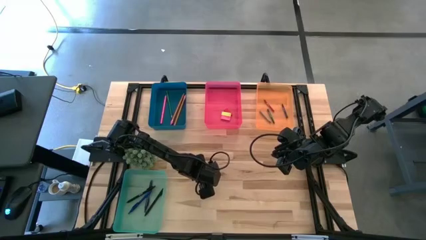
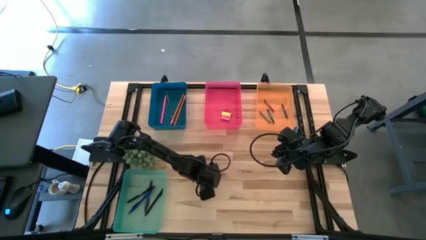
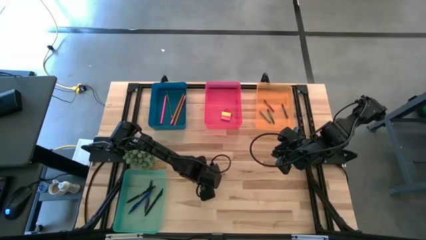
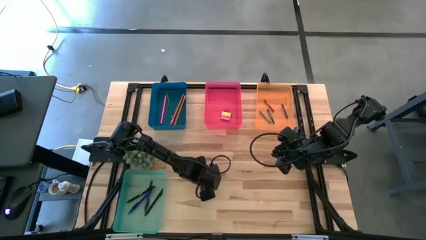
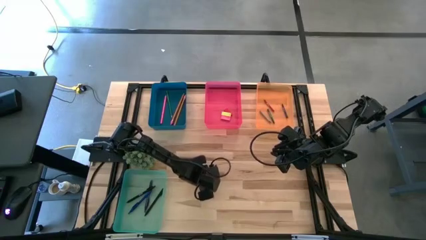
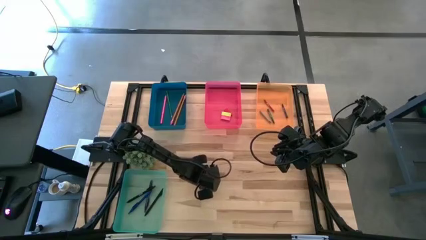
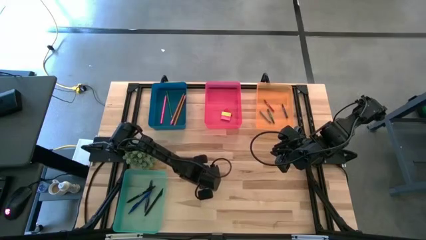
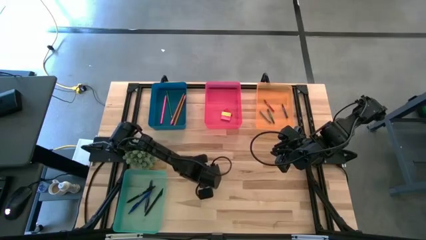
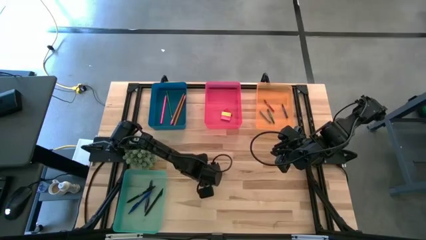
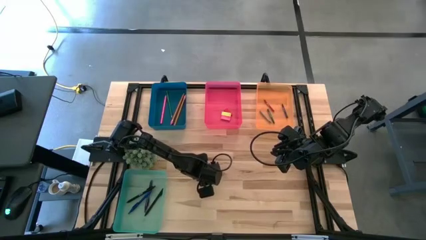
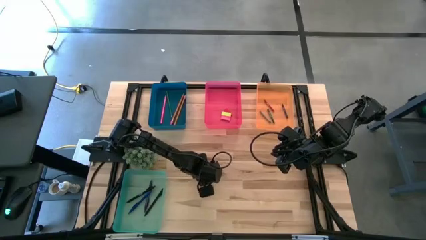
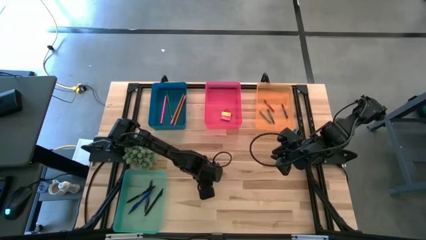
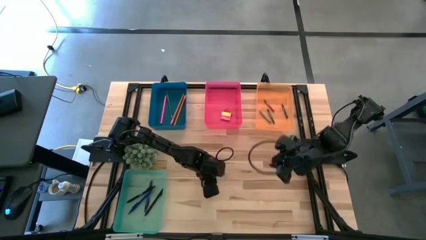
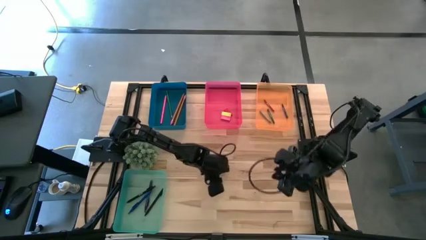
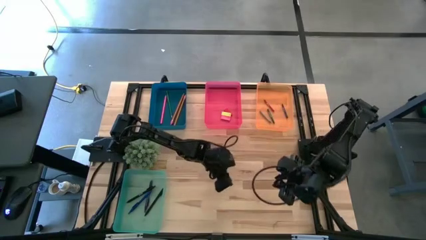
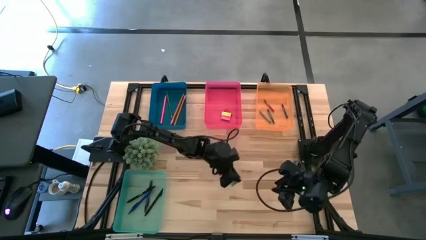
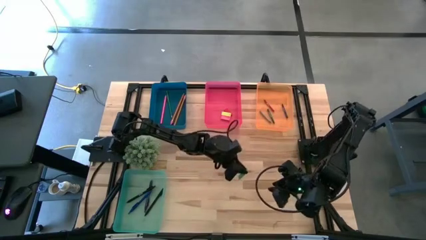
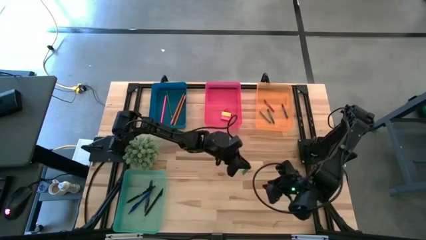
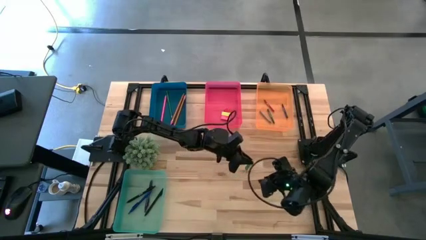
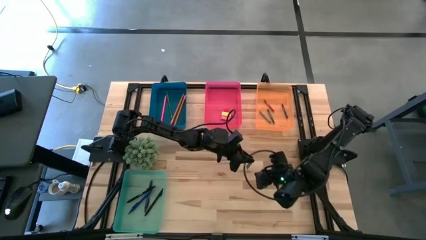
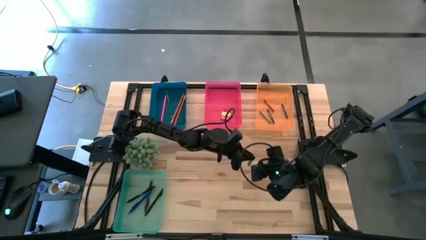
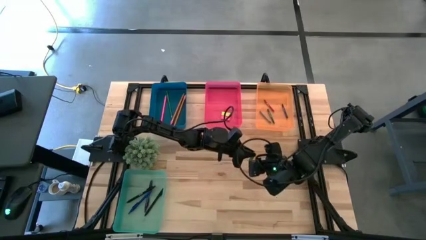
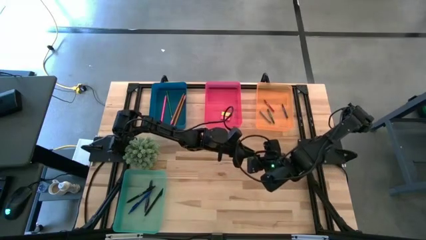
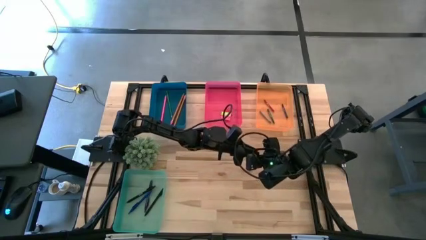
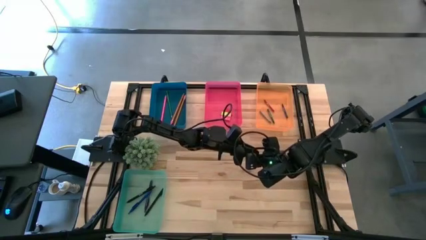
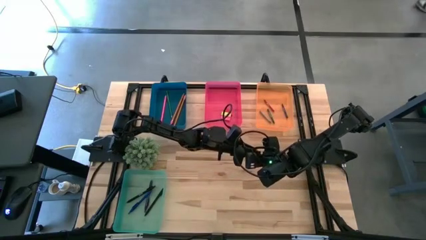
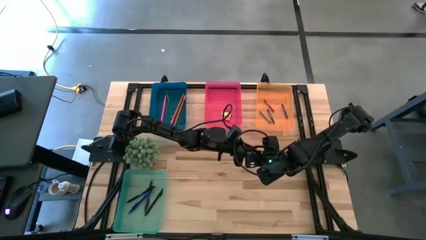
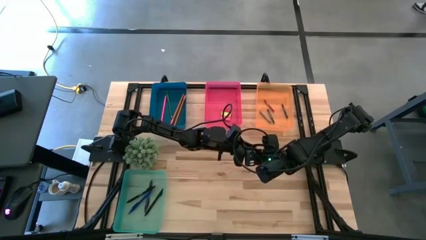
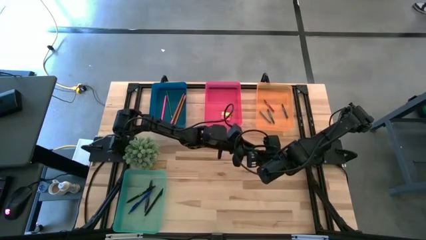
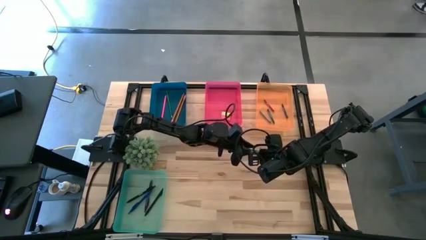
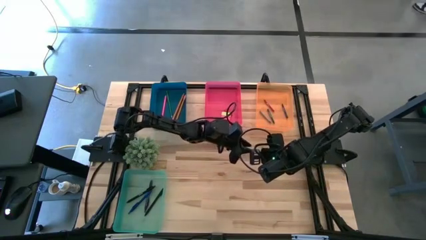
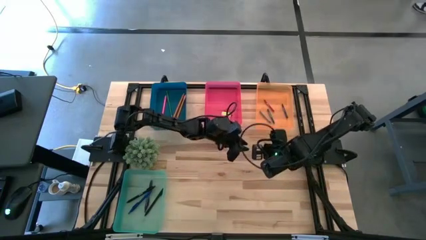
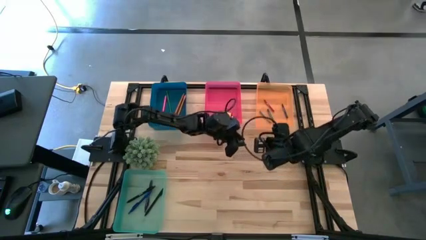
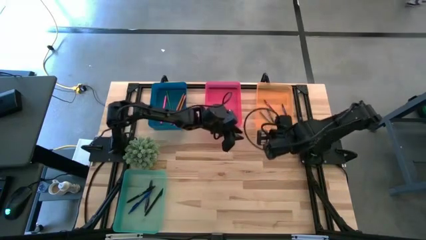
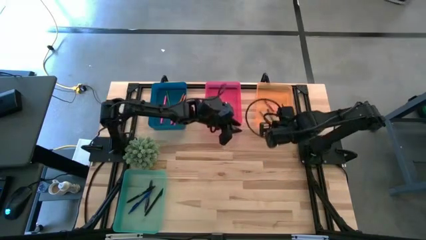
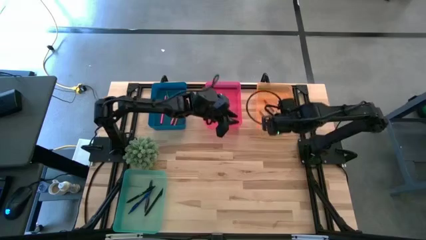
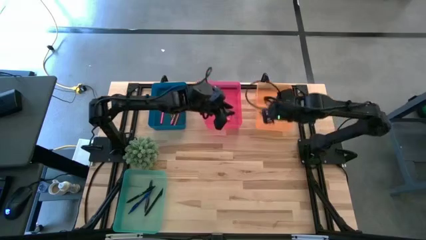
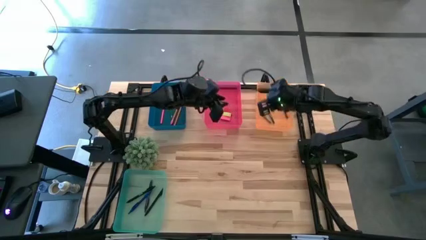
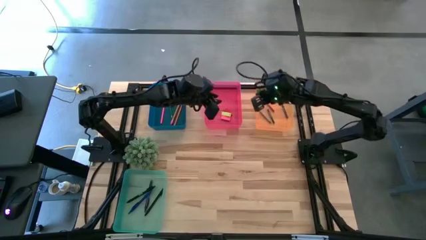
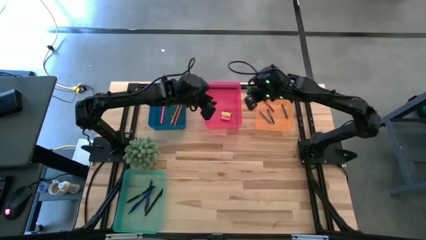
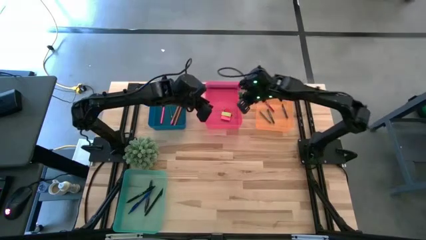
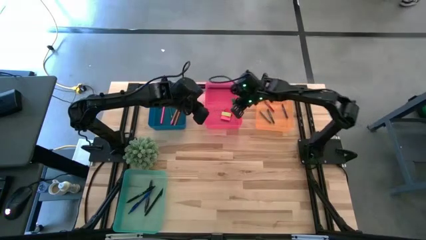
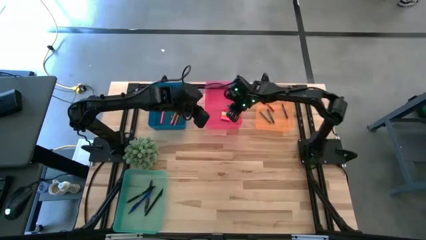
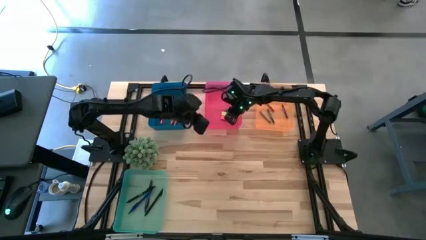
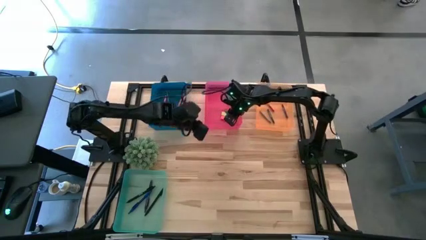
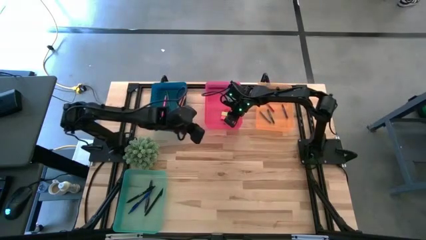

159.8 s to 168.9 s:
Task: Sort crayons/erasers/pens/pencils in bins
Put the green eraser into the pink bin

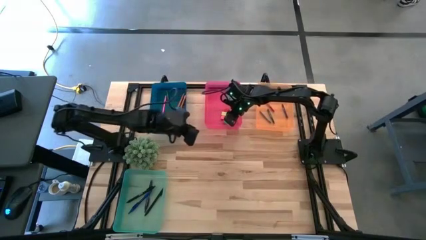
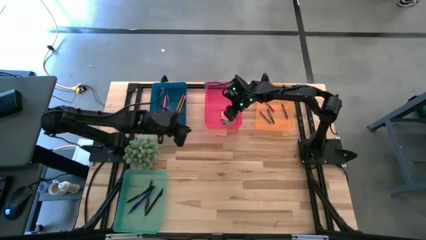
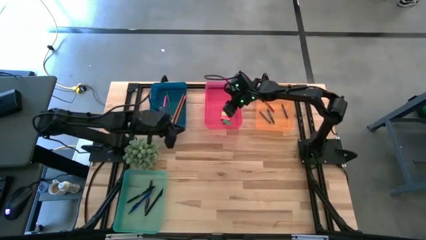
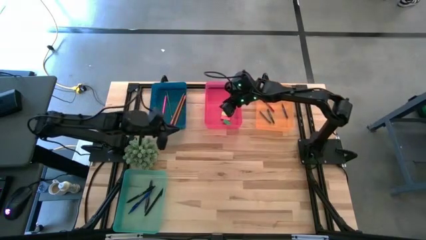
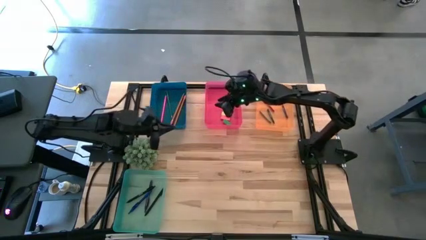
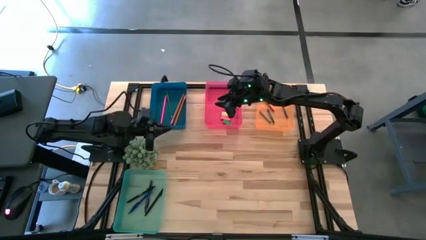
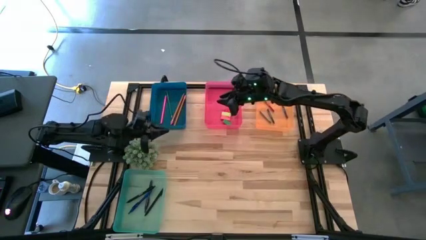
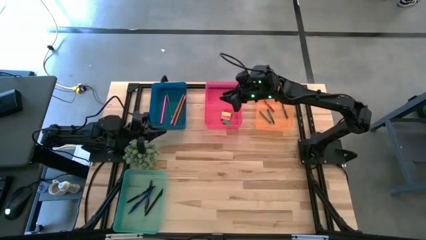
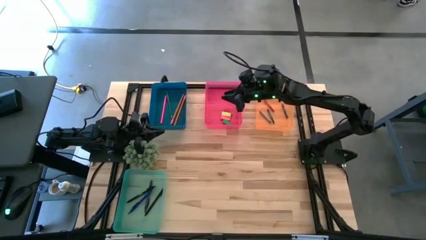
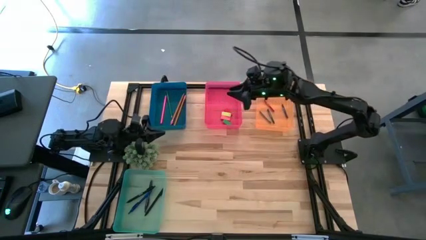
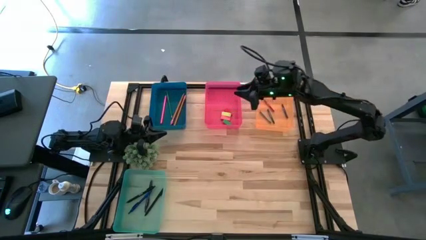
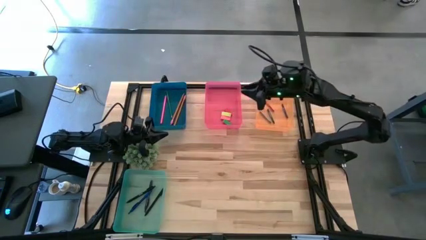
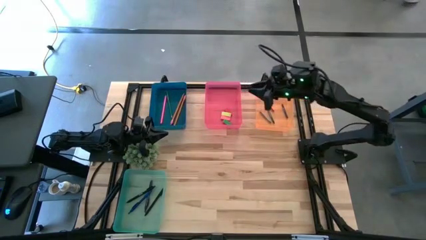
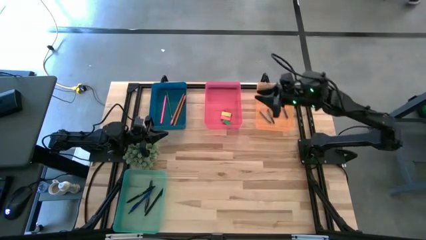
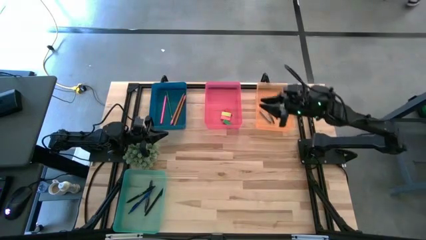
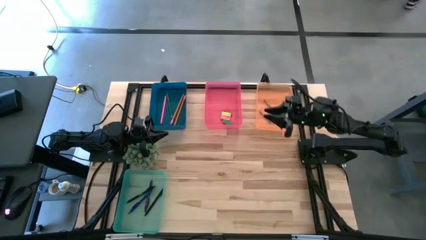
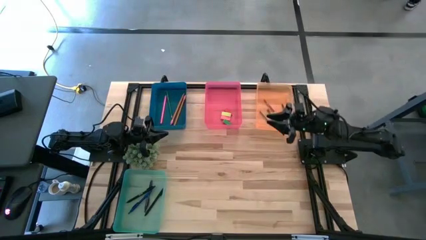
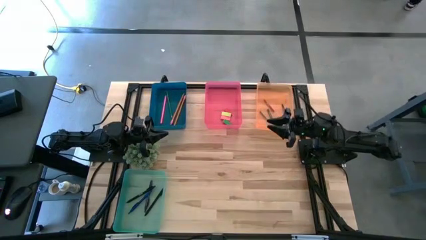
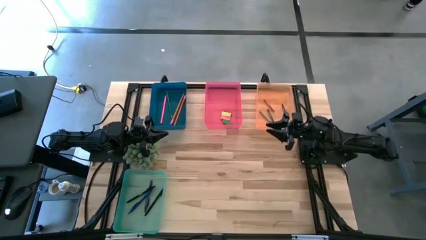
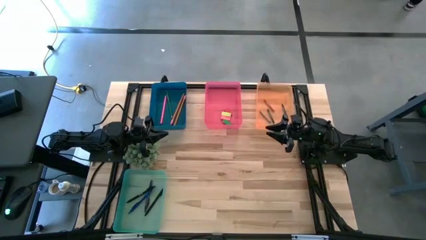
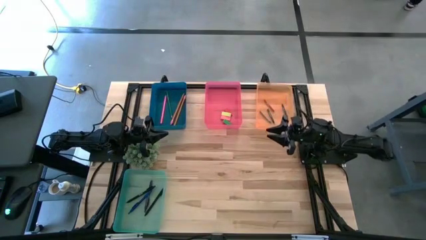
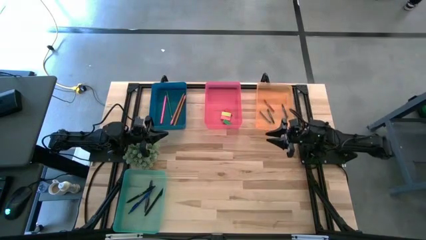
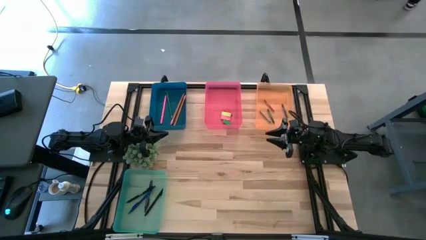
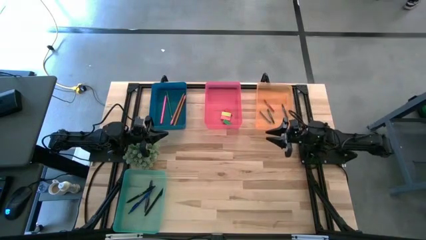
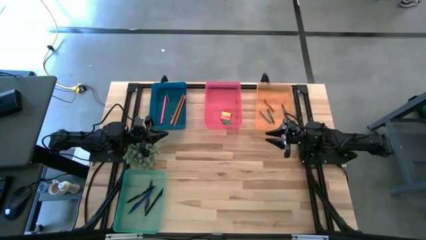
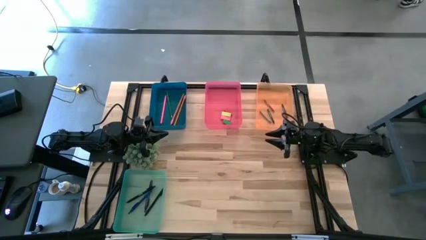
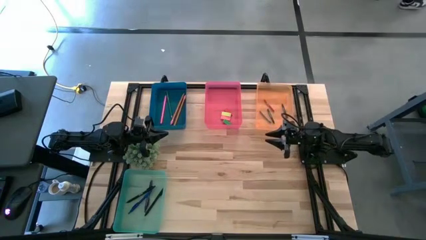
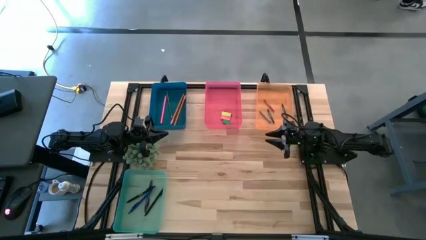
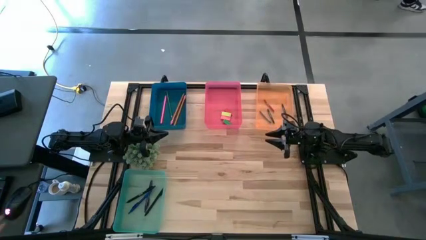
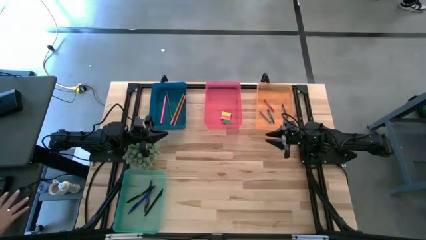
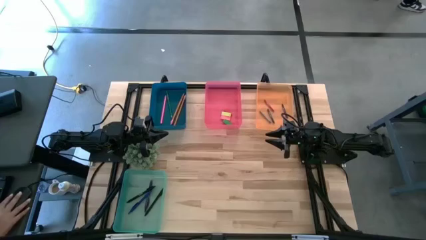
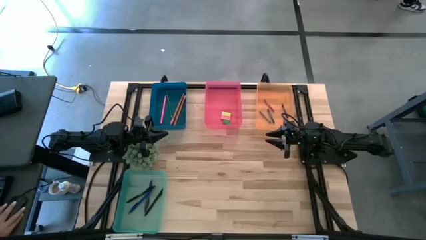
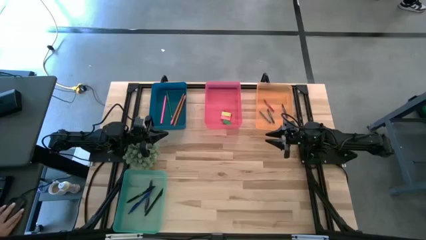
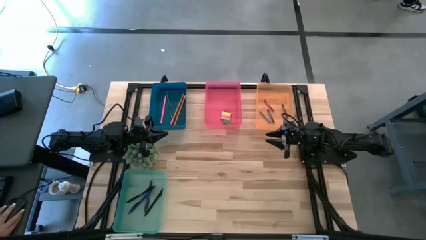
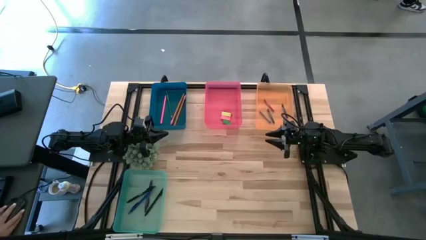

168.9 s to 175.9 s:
Return to Home Position
